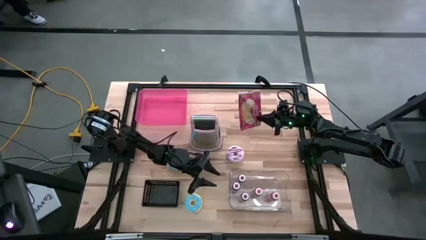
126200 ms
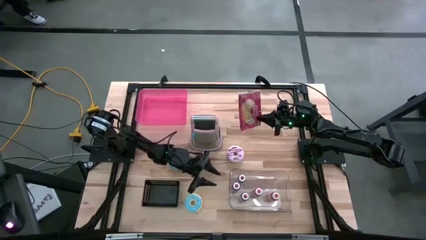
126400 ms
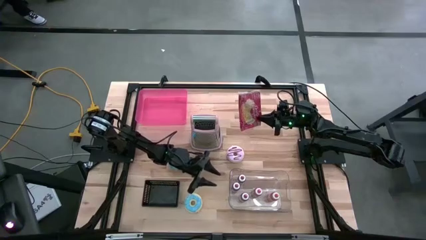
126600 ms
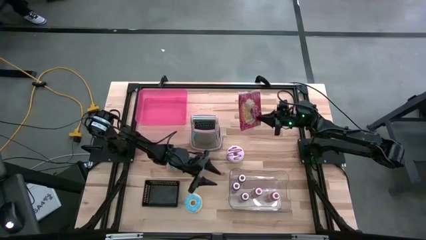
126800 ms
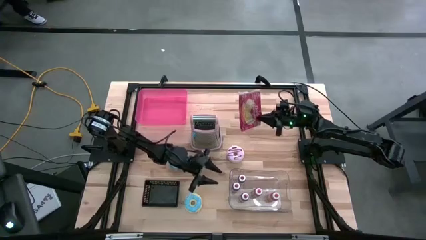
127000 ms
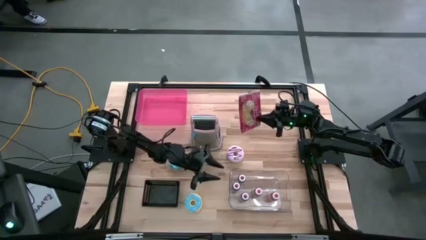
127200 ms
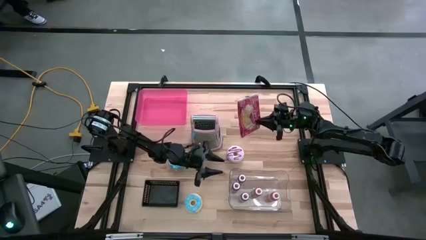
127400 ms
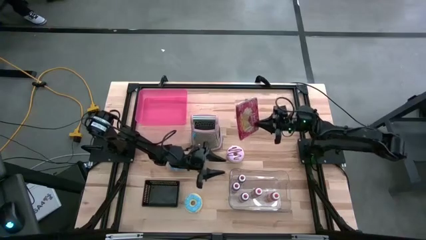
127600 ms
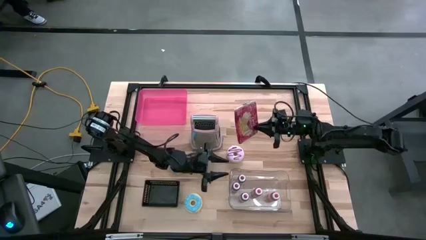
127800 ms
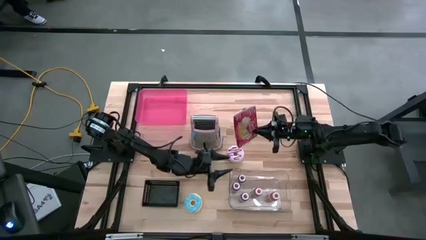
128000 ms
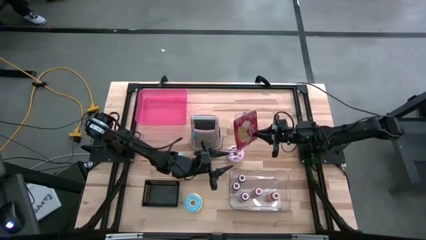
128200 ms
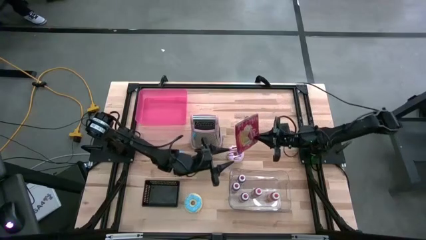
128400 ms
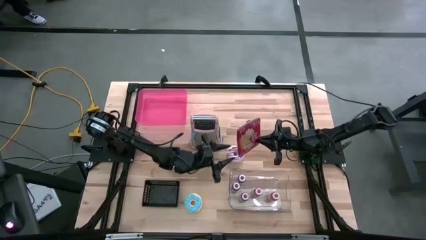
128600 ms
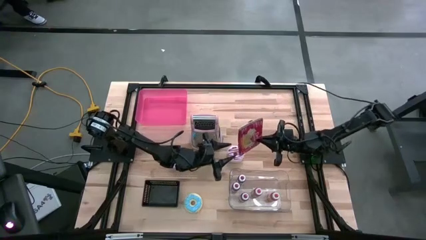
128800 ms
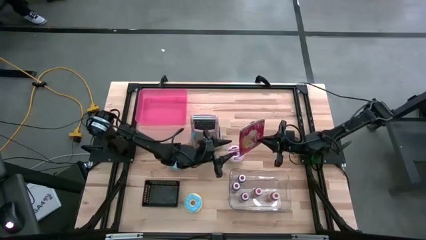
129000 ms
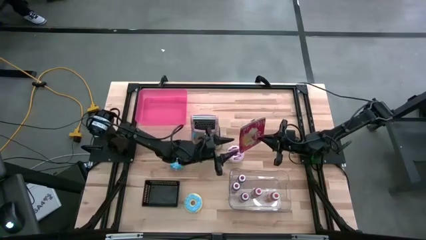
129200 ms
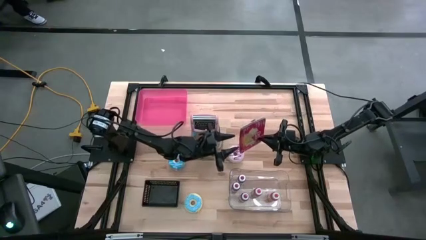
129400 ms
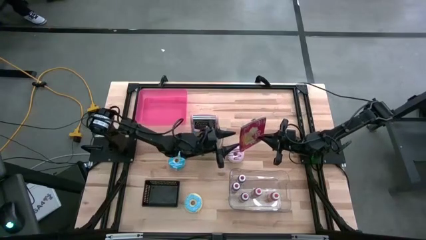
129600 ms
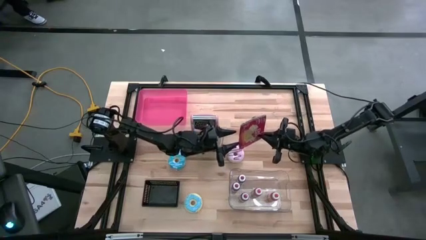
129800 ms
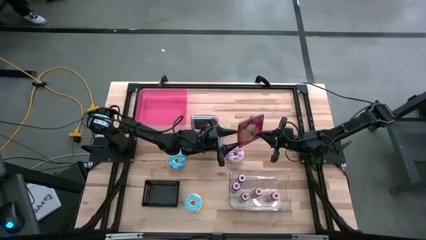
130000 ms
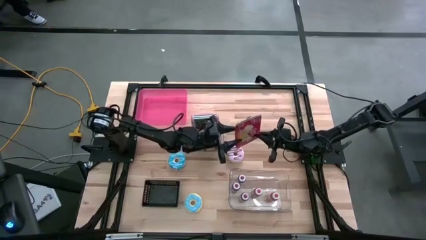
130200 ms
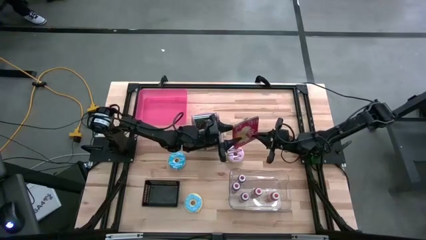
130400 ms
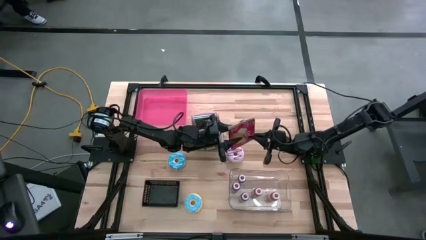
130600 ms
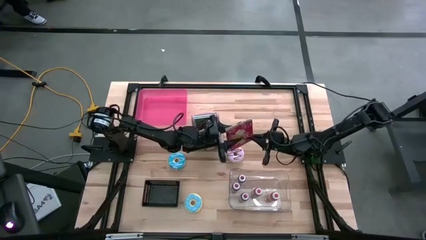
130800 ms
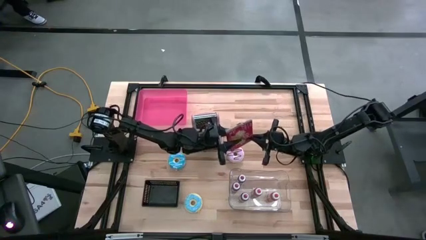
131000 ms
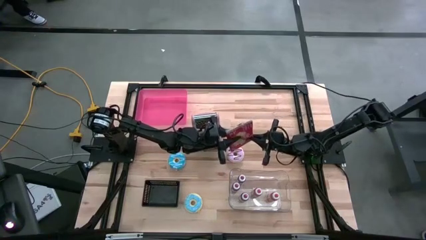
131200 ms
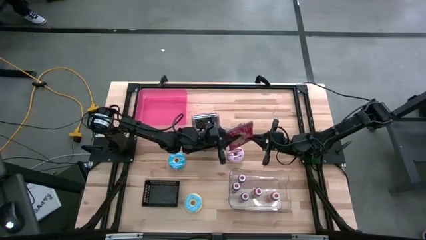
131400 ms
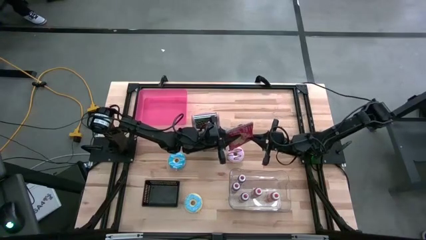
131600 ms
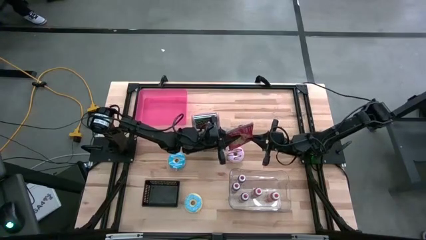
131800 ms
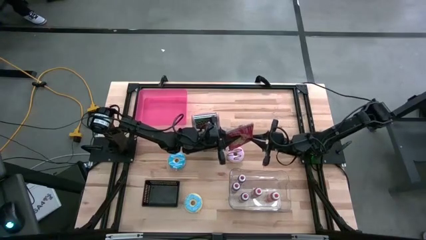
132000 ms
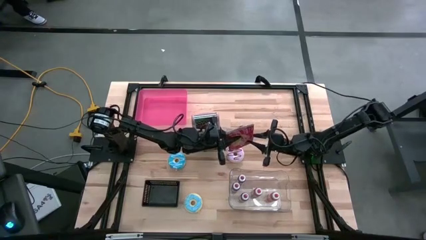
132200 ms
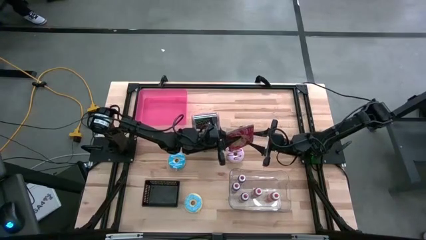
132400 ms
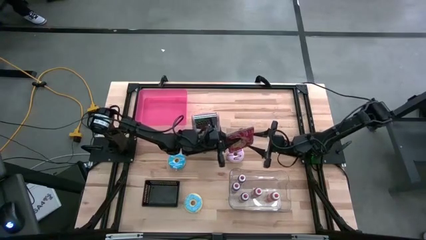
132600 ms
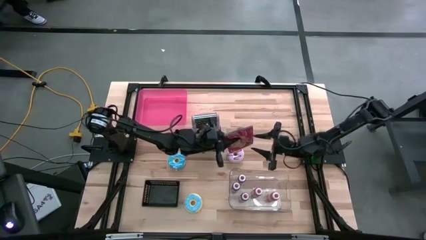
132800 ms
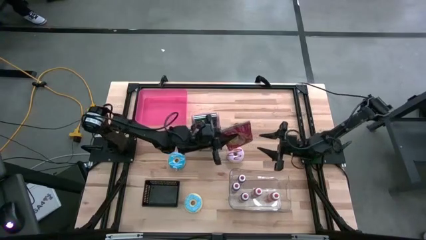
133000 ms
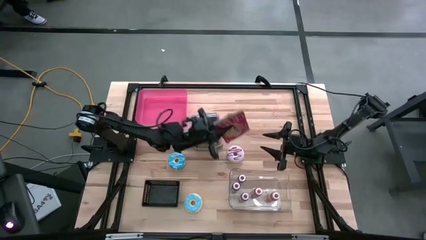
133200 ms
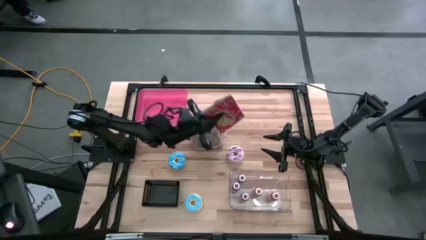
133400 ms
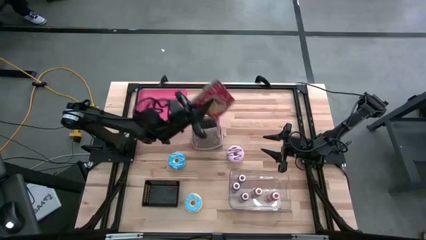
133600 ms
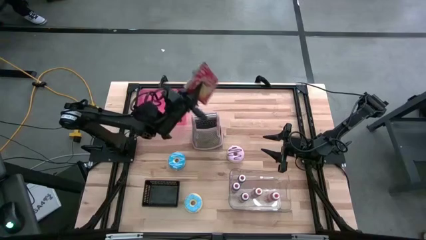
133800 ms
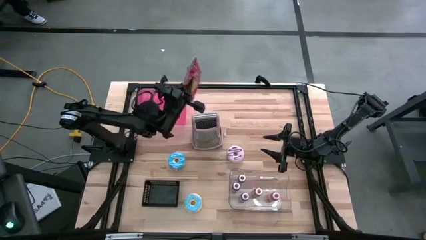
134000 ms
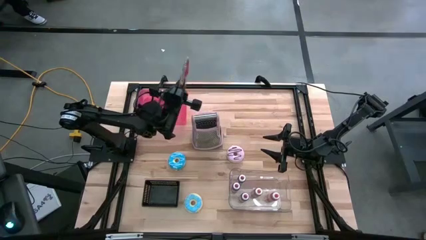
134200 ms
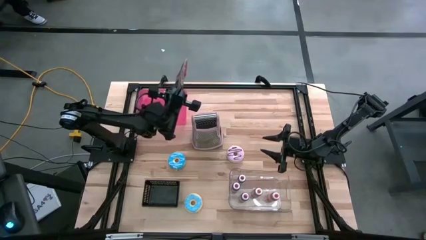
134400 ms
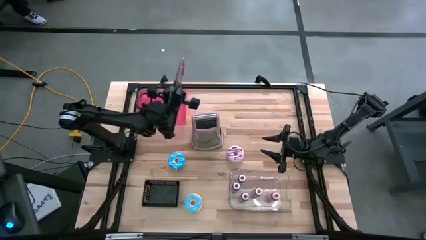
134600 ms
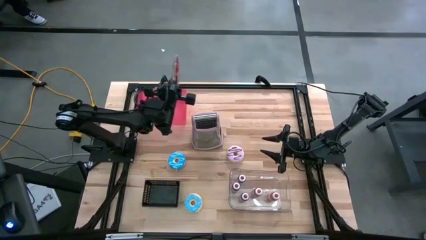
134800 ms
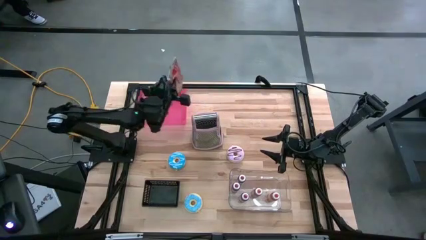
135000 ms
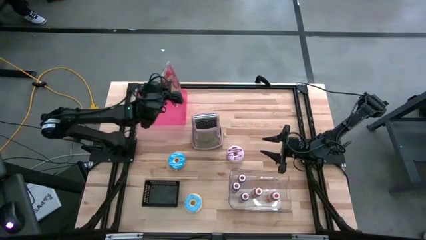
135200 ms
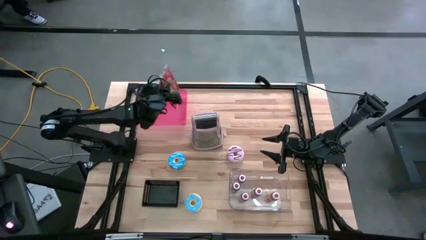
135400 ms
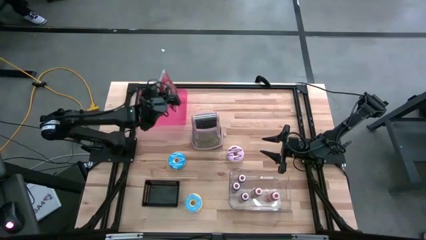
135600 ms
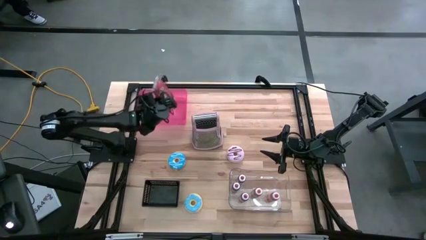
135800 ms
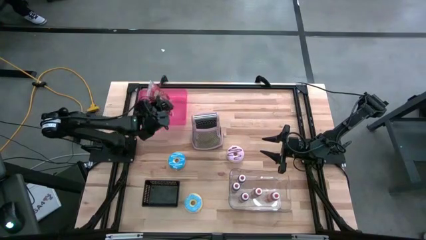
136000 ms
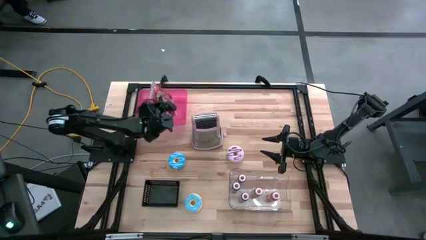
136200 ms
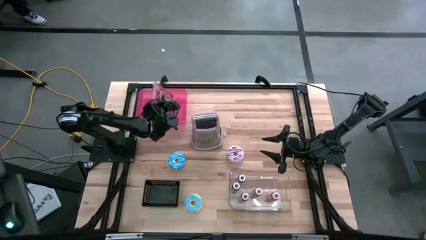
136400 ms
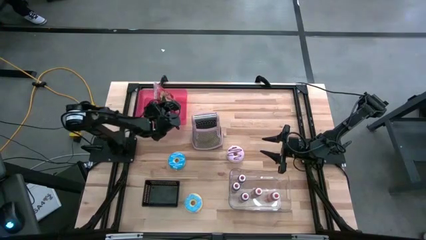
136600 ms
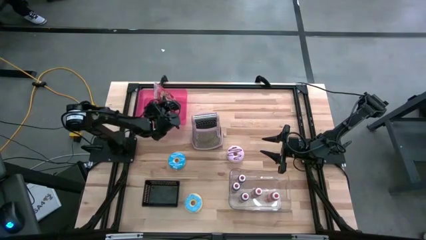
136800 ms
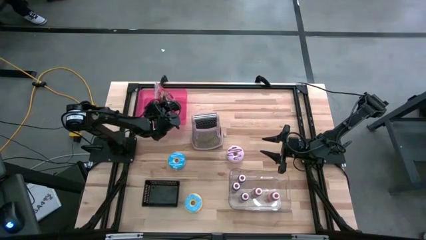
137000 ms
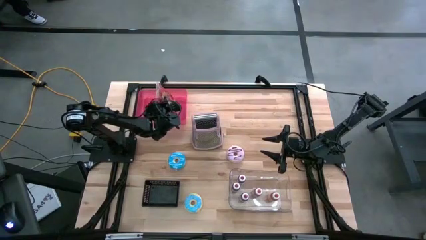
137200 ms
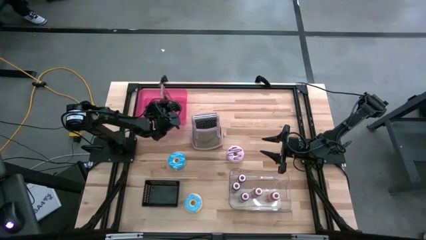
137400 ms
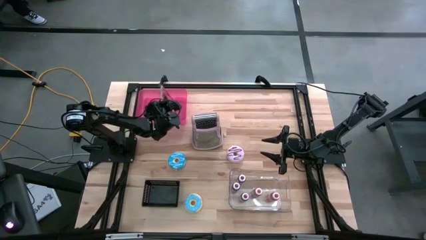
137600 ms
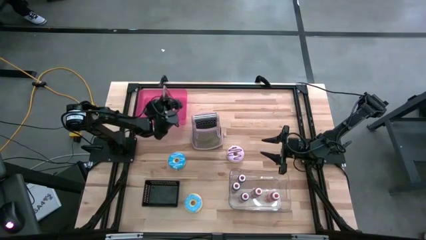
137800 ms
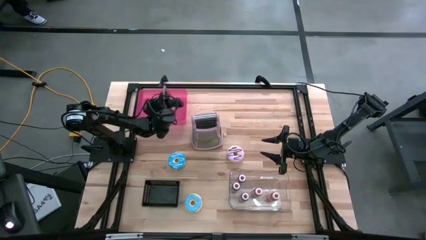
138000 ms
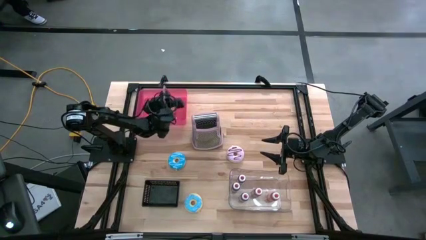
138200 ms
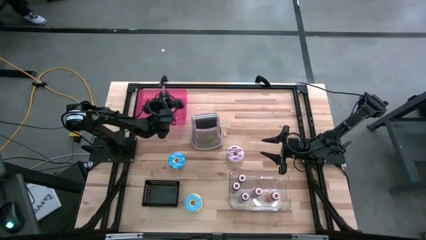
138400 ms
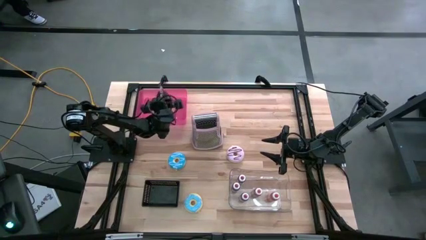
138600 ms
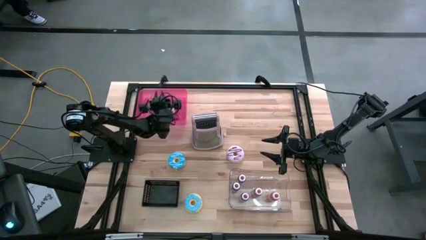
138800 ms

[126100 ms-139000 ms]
Task: Pick & Place Food Item
Put the popcorn bag into the pink bin

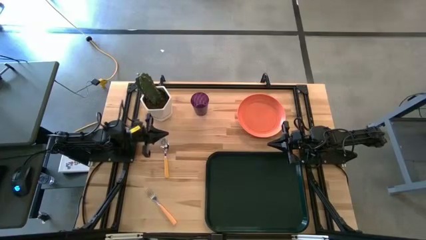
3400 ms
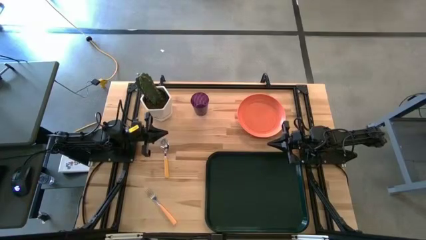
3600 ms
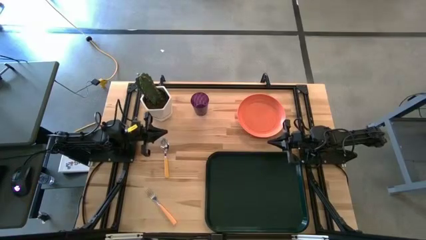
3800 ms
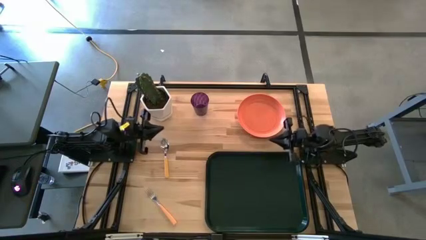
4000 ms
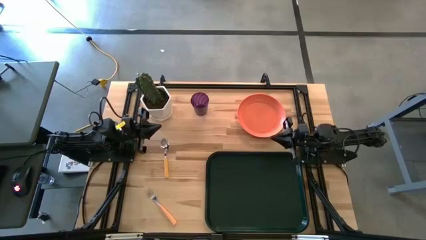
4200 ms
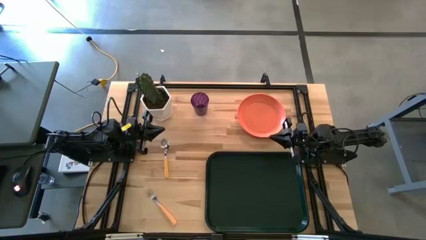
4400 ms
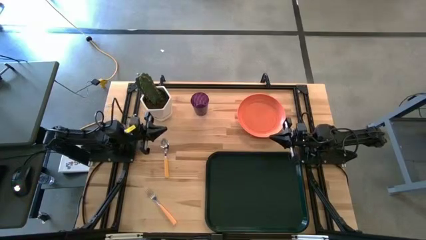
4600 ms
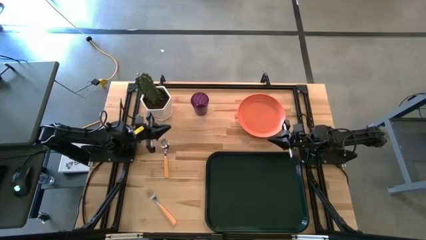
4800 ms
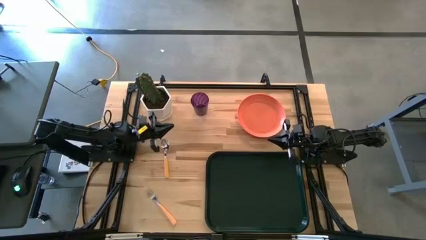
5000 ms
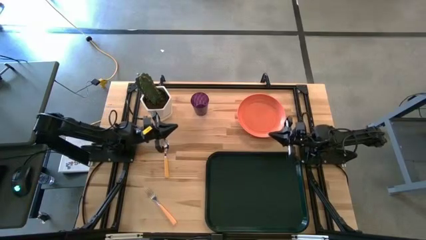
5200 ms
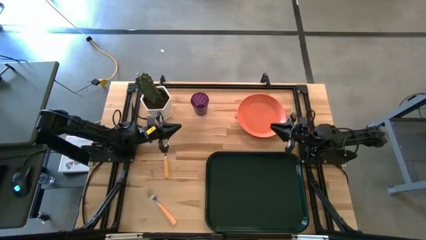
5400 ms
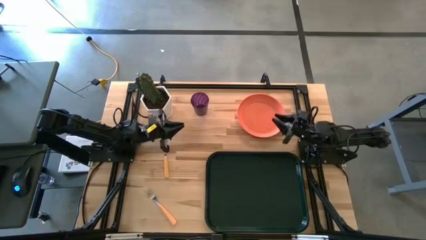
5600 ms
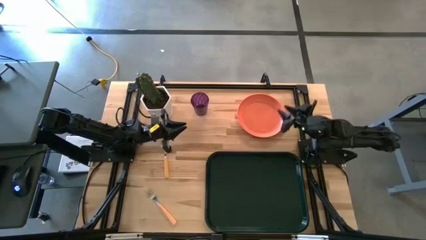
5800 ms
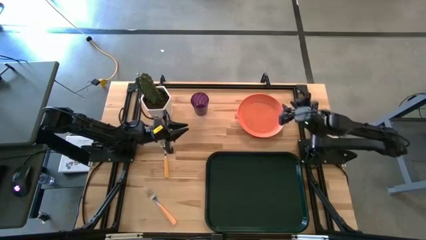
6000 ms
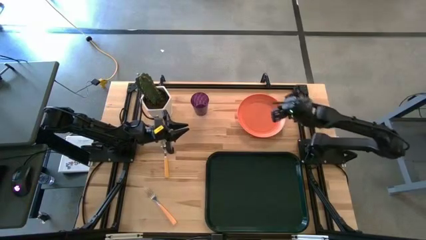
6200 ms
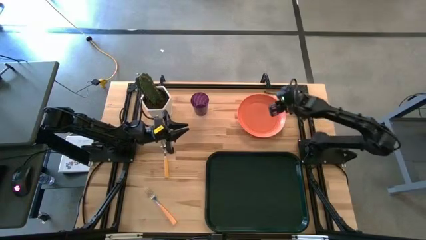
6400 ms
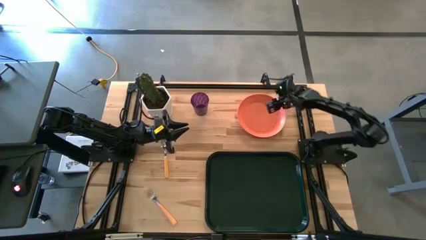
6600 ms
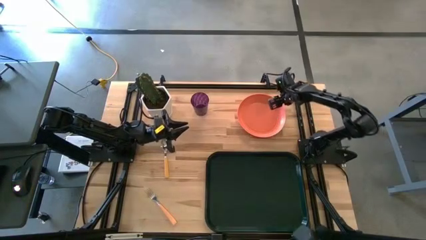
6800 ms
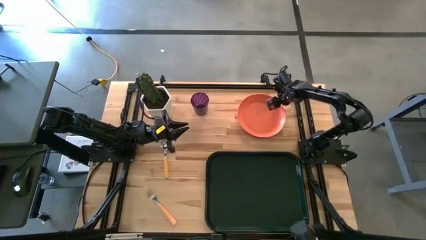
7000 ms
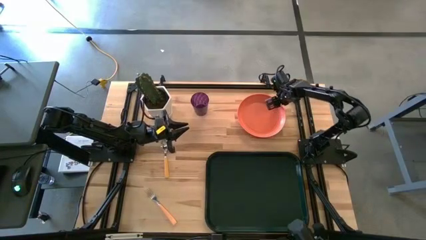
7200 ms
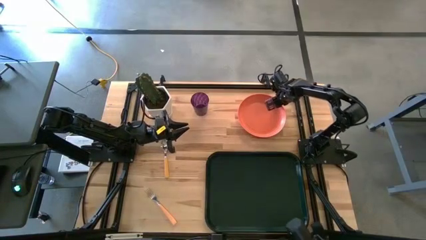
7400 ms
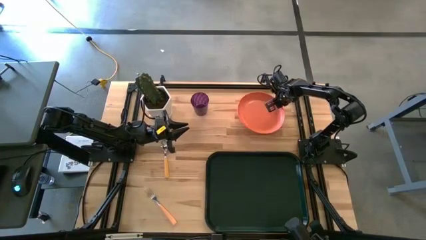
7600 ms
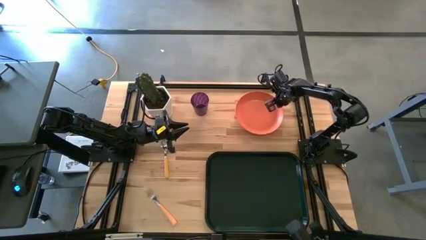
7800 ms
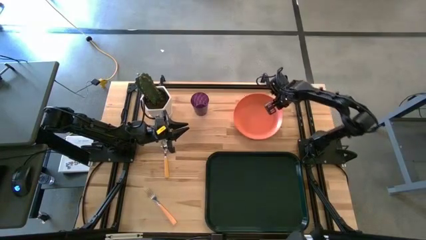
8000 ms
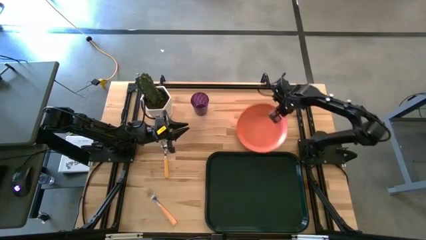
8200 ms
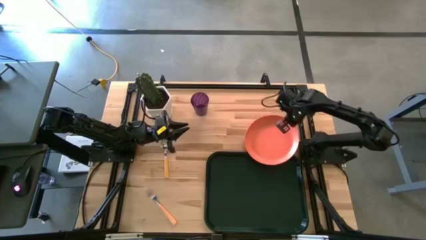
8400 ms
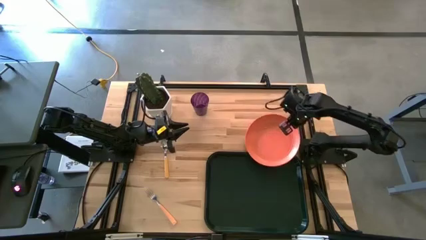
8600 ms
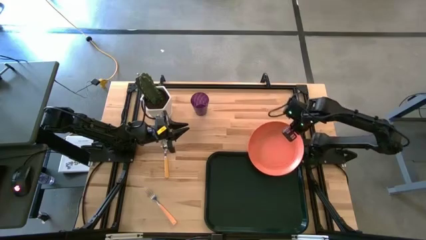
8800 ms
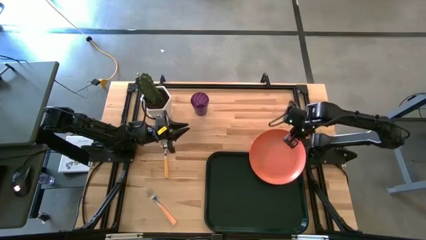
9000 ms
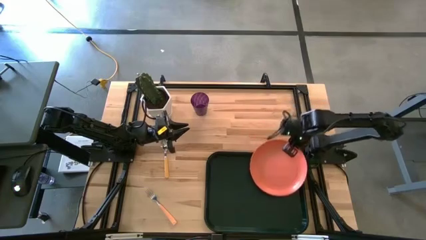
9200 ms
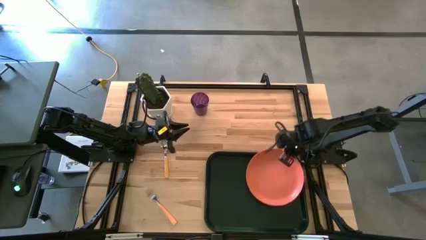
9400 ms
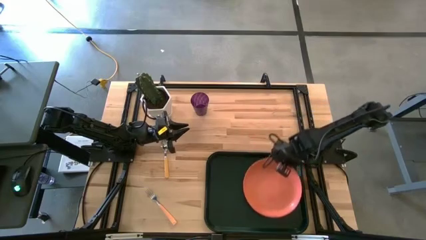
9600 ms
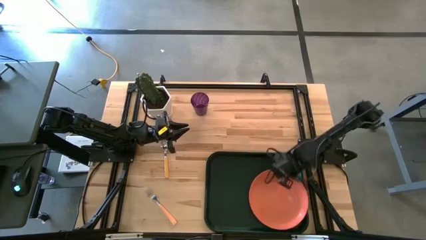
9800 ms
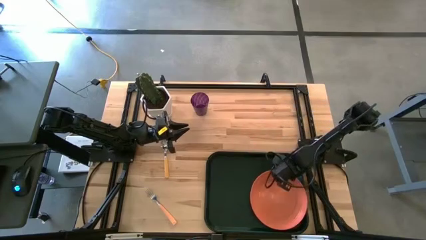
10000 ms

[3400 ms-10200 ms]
Task: Pick and place plate/cup/fork/spoon on tray
Put the orange plate on the black serving tray
